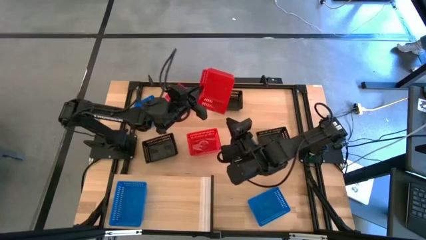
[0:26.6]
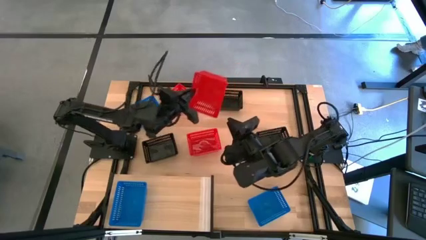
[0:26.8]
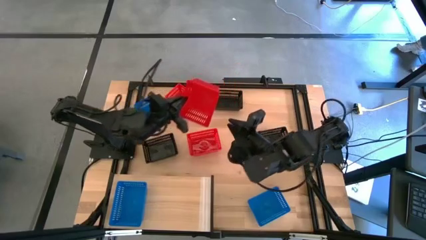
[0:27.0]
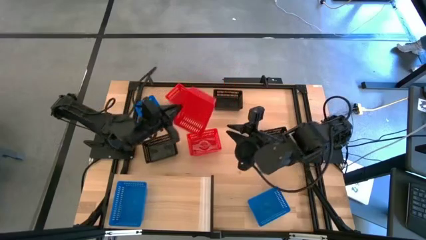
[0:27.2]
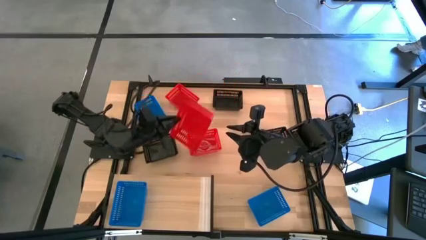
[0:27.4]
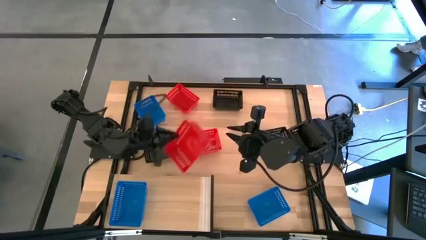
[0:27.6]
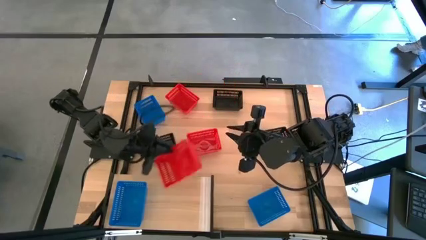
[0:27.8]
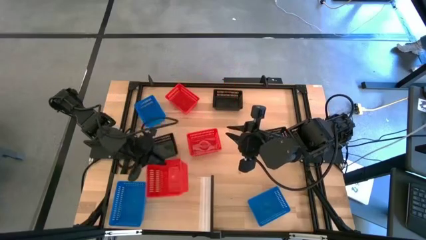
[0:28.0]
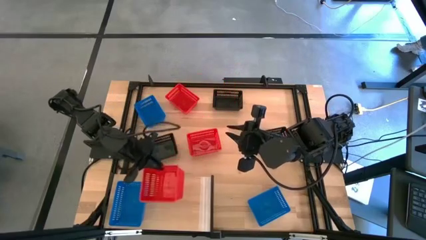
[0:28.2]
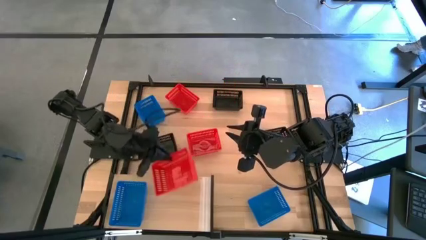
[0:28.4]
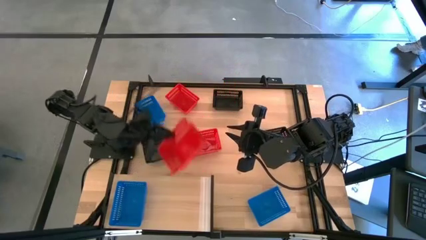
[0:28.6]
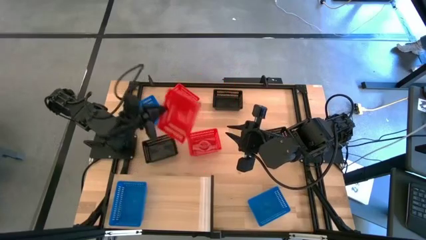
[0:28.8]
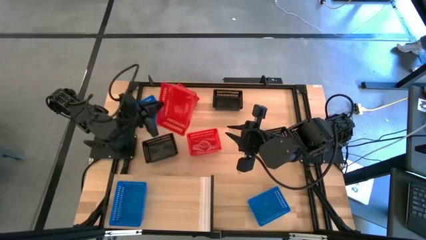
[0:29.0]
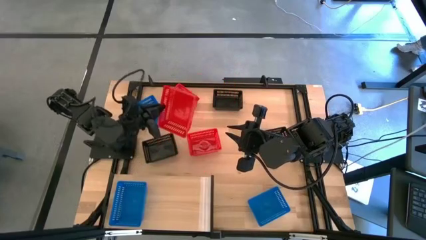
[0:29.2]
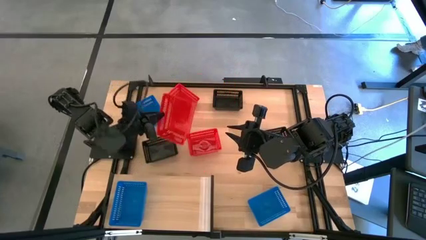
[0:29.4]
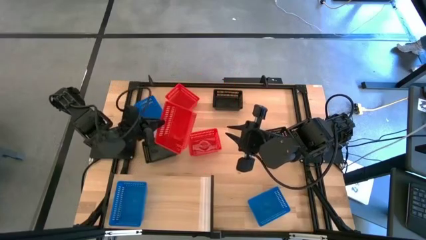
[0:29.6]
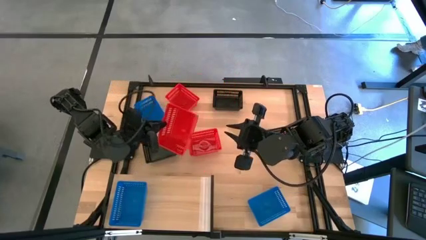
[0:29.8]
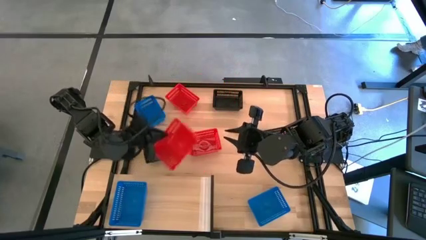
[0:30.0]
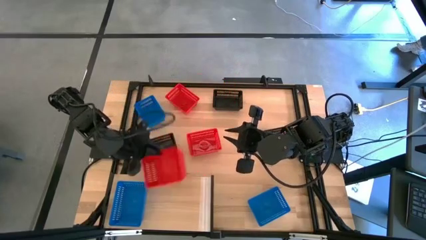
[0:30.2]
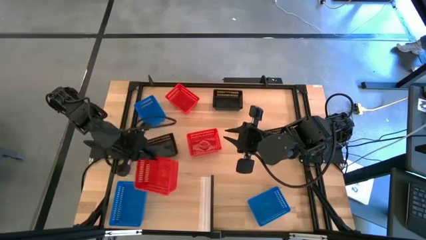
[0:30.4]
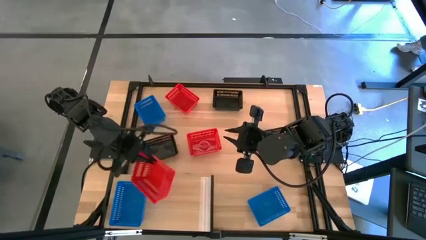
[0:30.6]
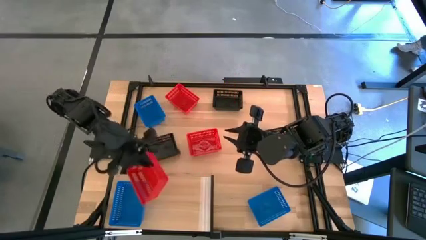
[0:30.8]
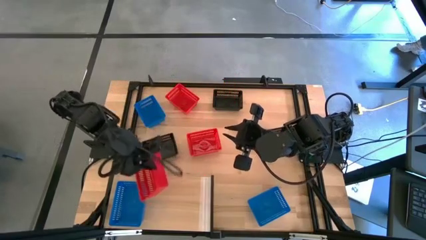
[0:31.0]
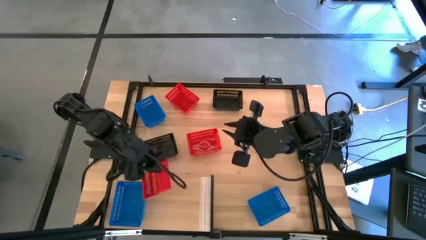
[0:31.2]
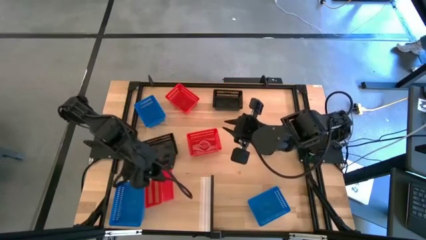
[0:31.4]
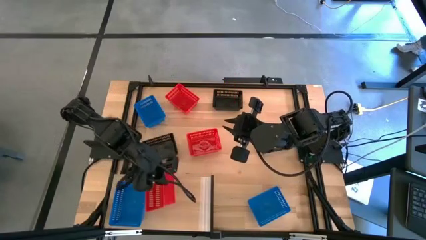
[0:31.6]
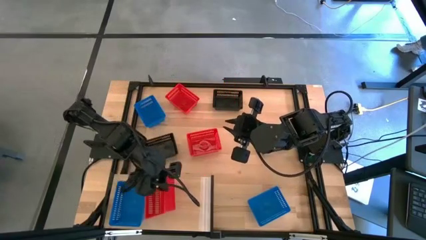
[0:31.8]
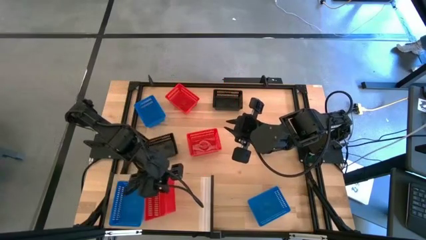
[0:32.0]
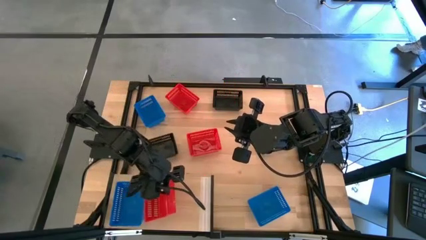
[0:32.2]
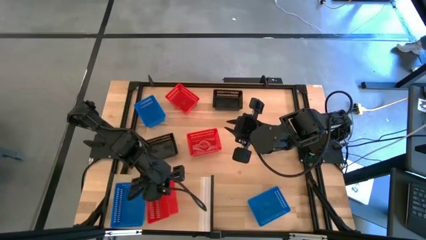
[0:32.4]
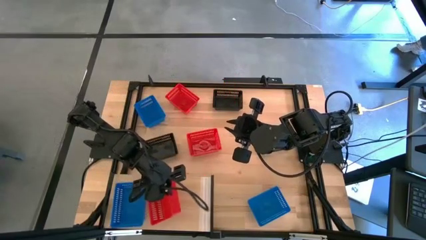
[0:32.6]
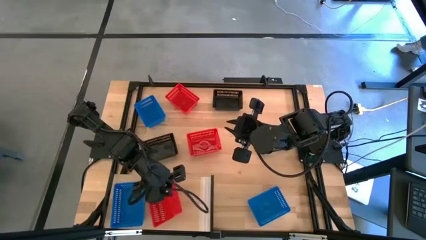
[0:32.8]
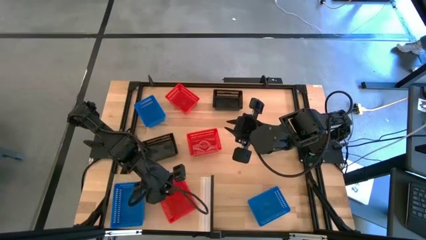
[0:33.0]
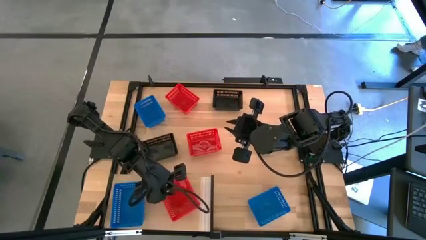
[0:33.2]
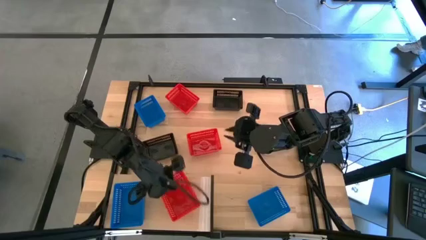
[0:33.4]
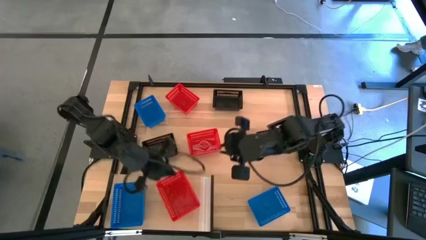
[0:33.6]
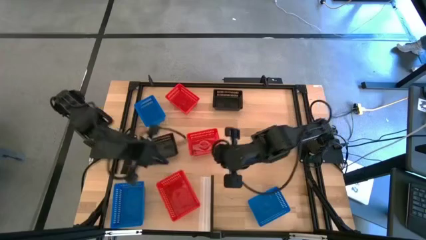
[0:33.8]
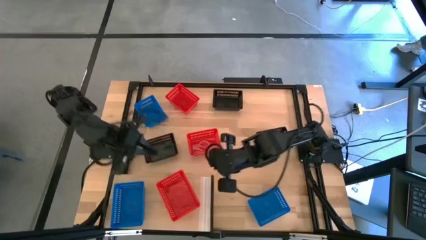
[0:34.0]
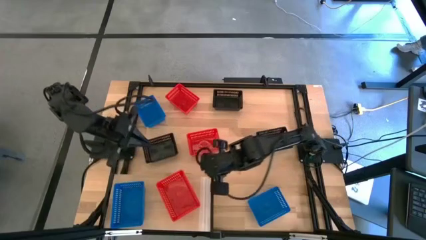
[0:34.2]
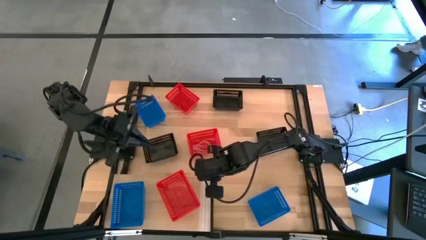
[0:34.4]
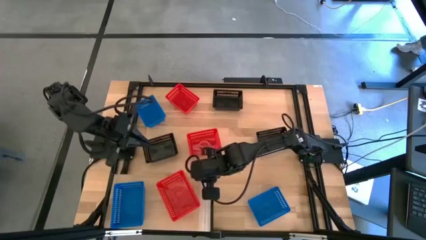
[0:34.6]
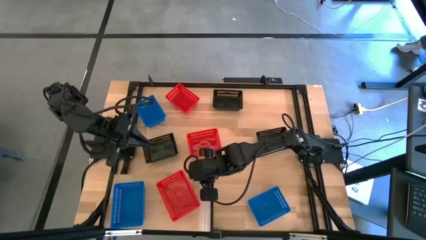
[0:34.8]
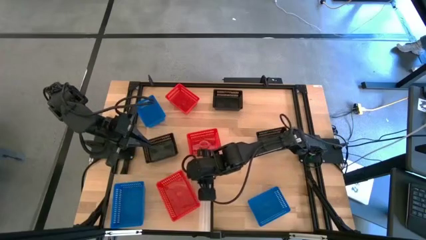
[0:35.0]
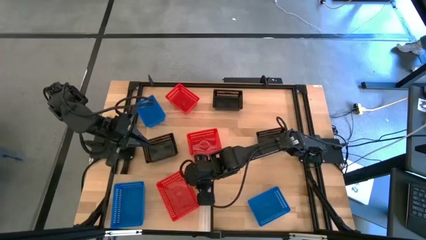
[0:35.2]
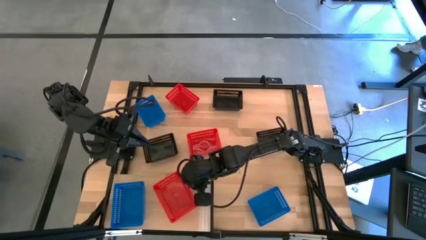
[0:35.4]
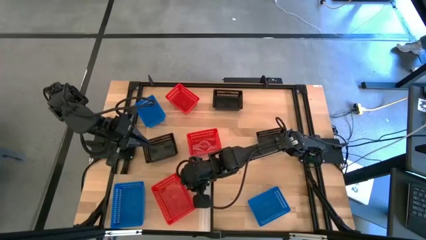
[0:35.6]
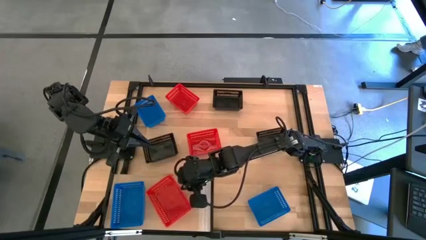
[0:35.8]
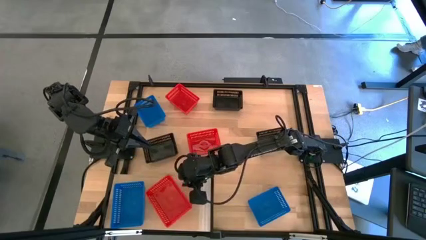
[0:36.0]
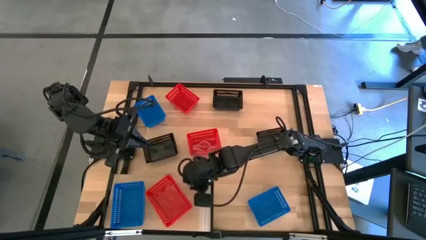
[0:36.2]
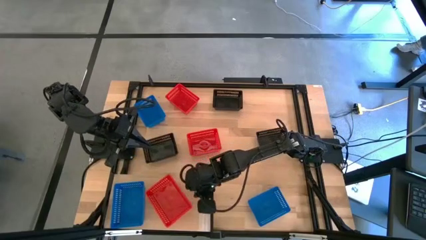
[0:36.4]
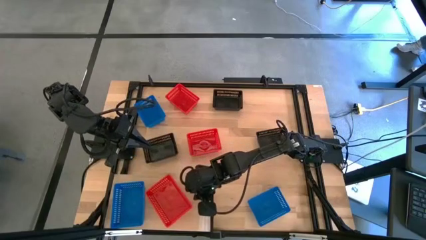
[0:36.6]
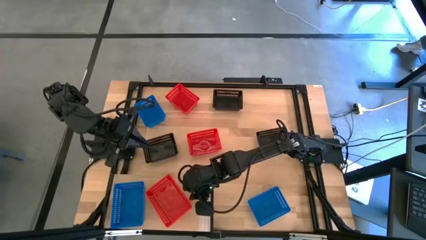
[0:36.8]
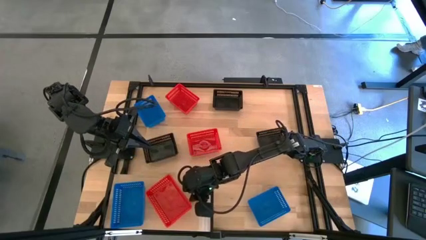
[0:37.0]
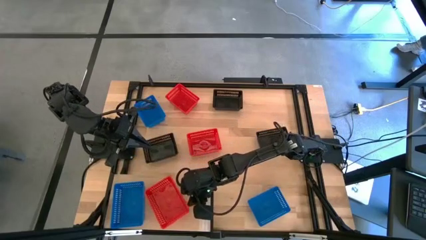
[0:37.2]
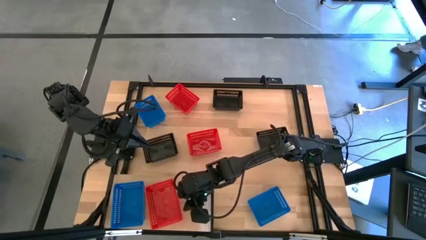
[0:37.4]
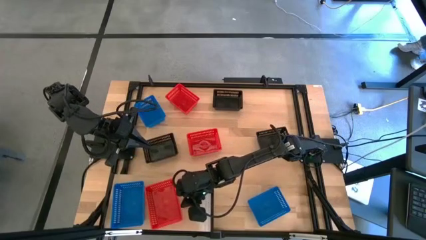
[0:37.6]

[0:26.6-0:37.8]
Task: Stack baskets on shelf by color
Put the right red bin on the shelf

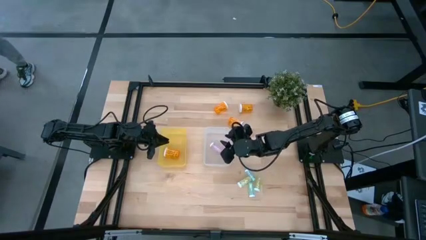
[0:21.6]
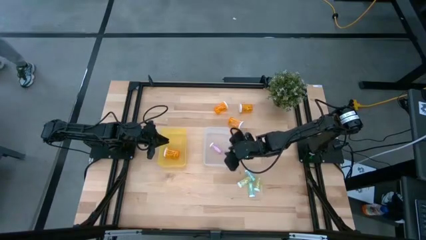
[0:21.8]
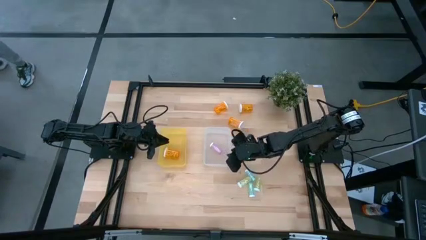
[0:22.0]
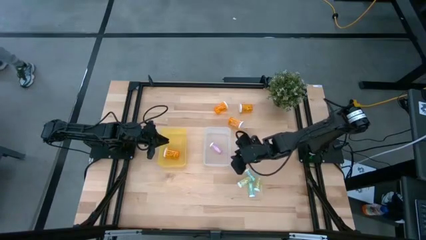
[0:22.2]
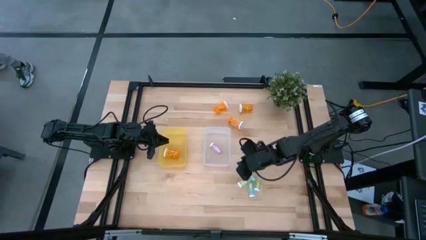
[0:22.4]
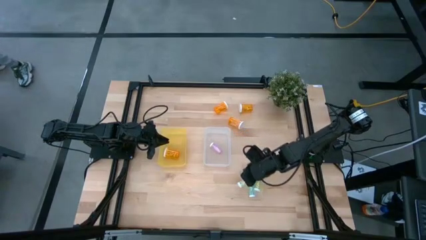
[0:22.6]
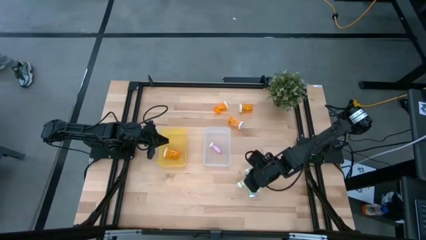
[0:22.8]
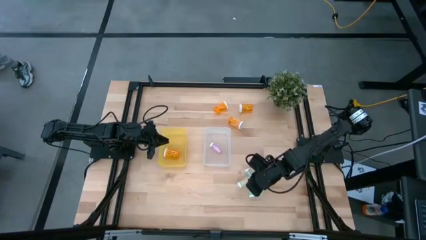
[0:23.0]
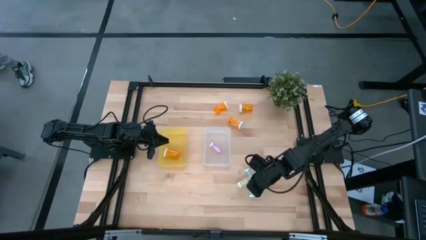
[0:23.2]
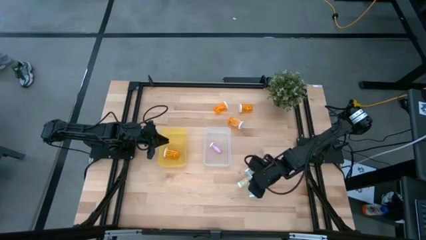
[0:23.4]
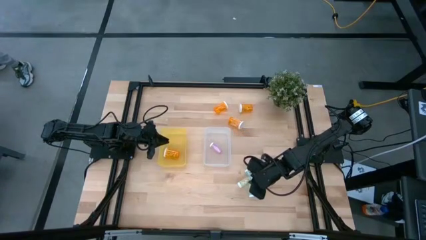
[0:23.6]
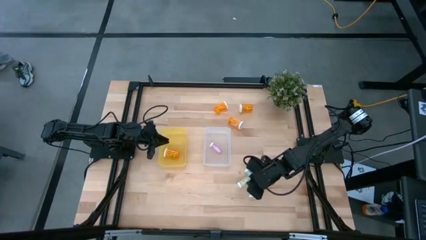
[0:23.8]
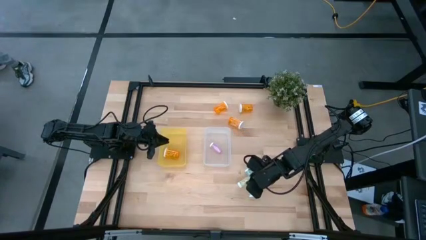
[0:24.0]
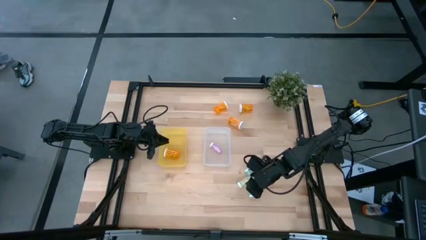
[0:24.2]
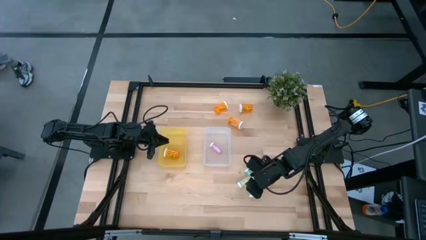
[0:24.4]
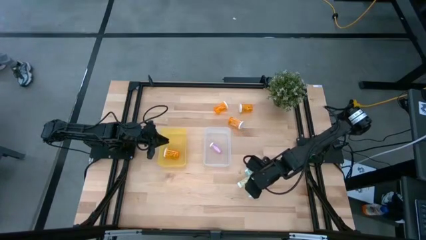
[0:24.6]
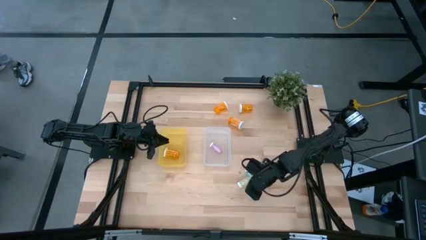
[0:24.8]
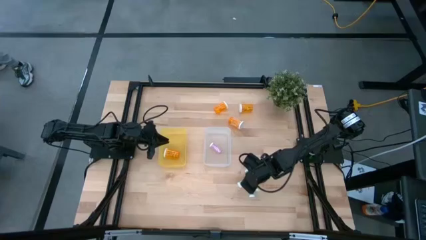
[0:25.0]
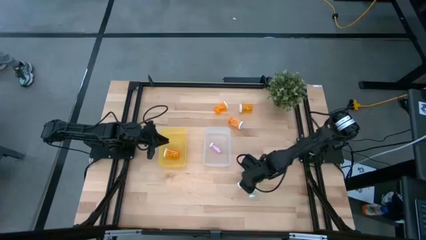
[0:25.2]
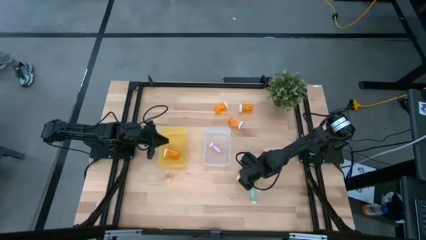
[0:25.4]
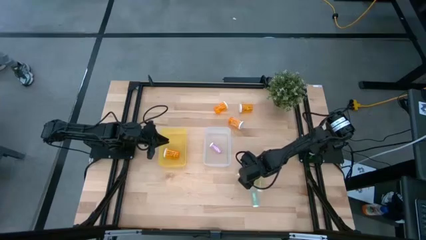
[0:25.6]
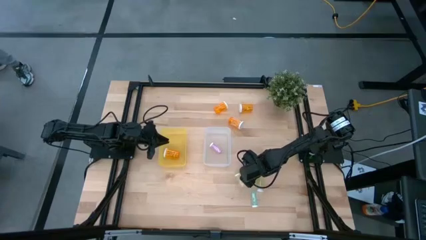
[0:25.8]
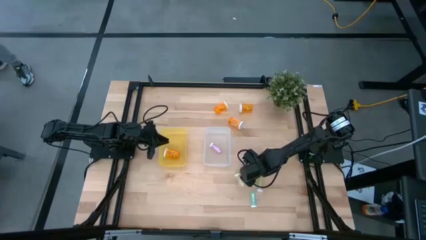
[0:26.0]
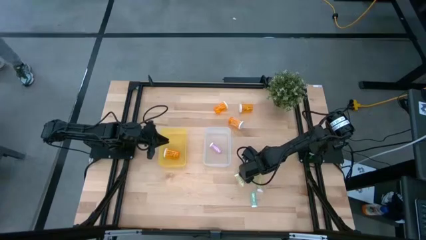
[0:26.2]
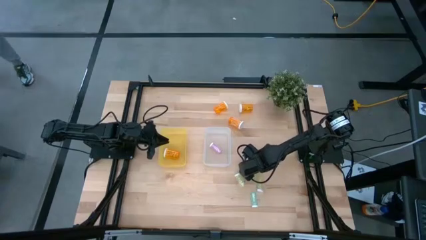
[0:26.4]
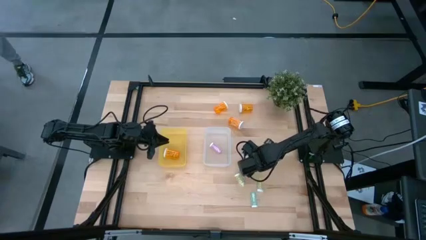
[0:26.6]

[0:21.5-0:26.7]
Task: Pick and place medicine bottles into bin by pill shape (circle, oval)
Put the green pill bottle into the transparent bin
